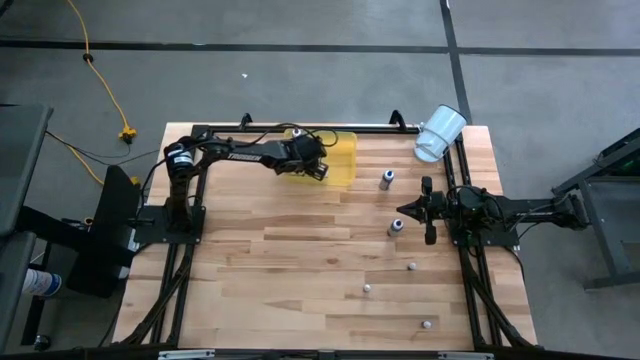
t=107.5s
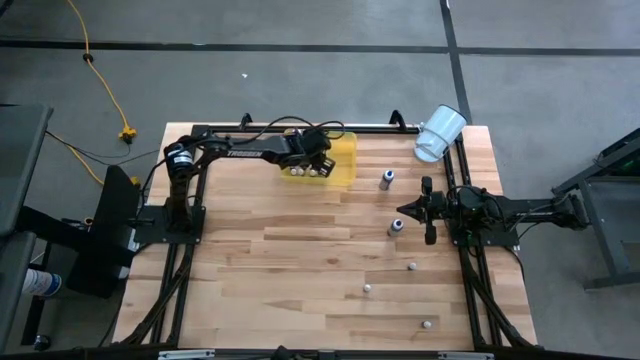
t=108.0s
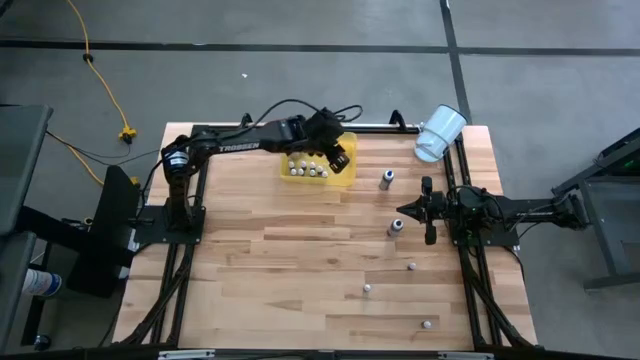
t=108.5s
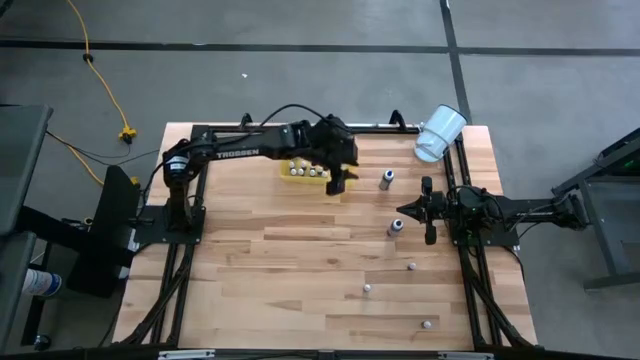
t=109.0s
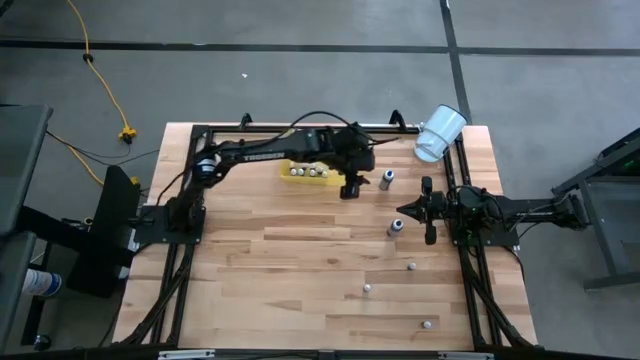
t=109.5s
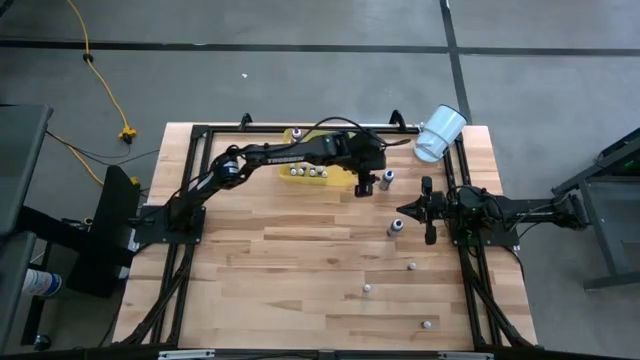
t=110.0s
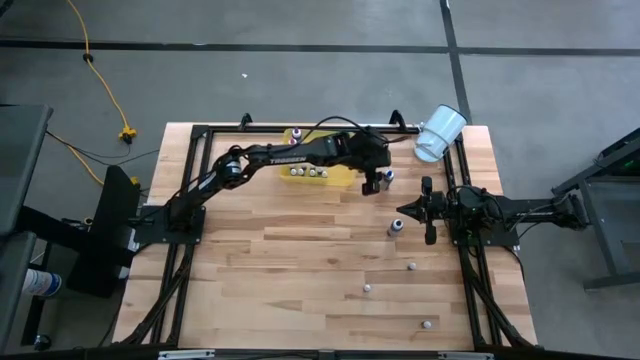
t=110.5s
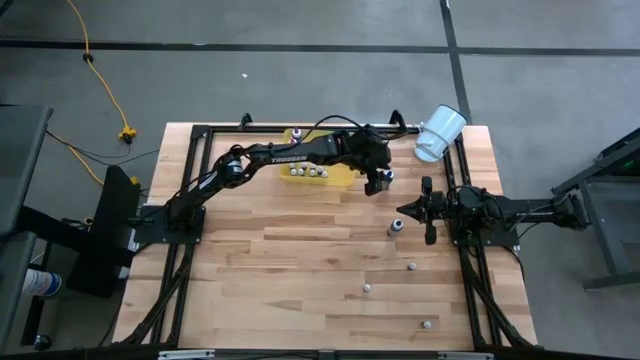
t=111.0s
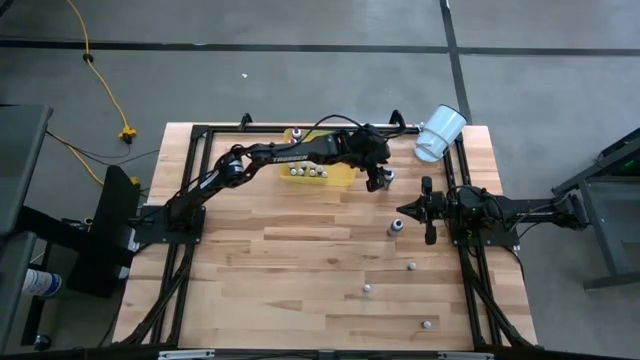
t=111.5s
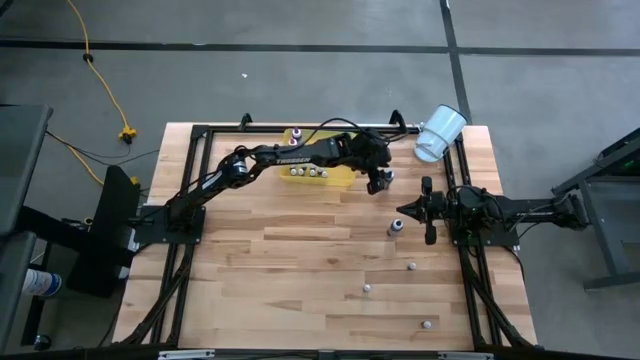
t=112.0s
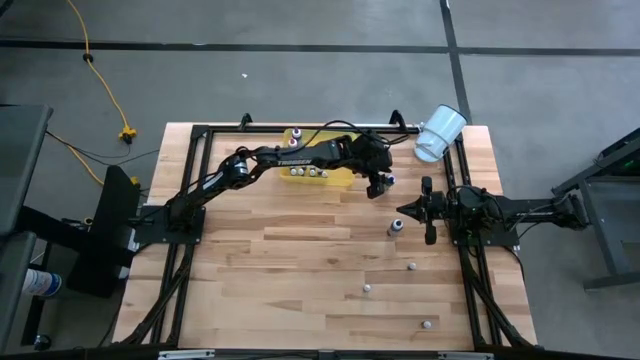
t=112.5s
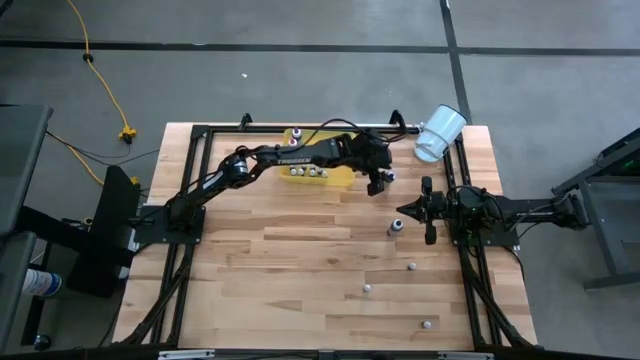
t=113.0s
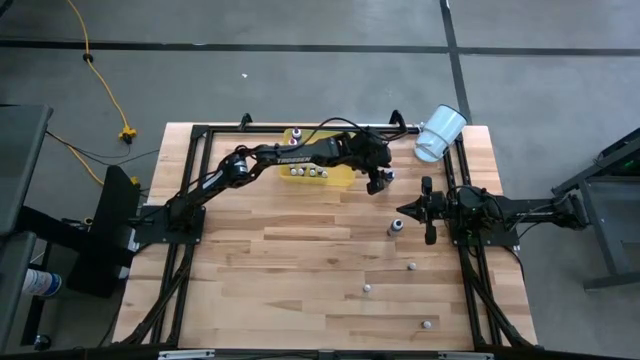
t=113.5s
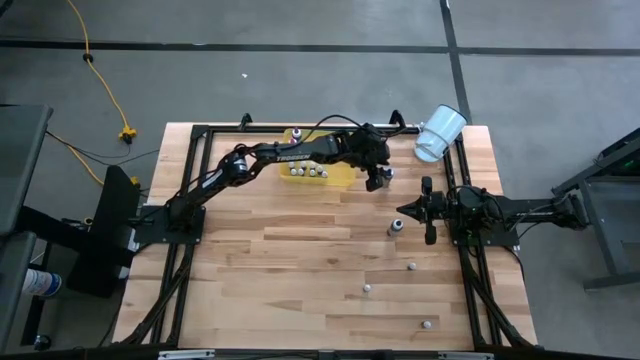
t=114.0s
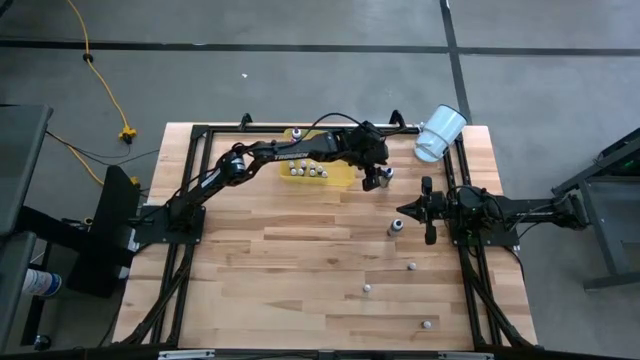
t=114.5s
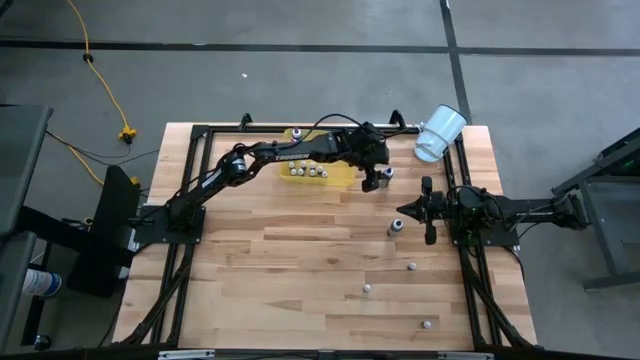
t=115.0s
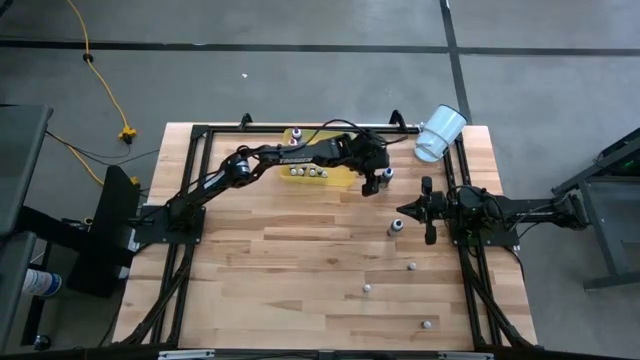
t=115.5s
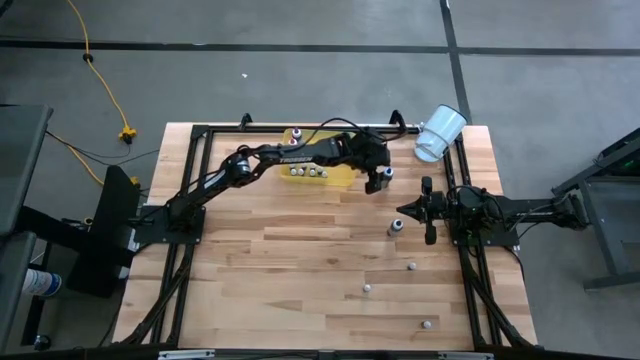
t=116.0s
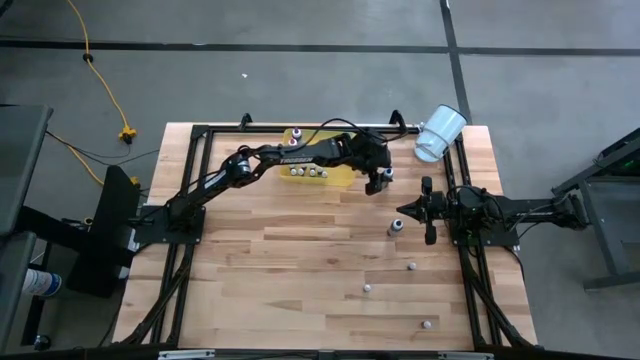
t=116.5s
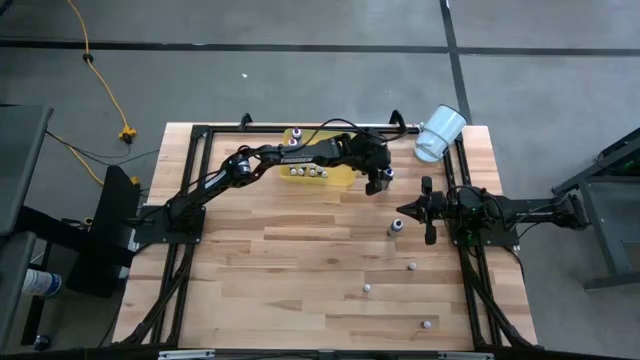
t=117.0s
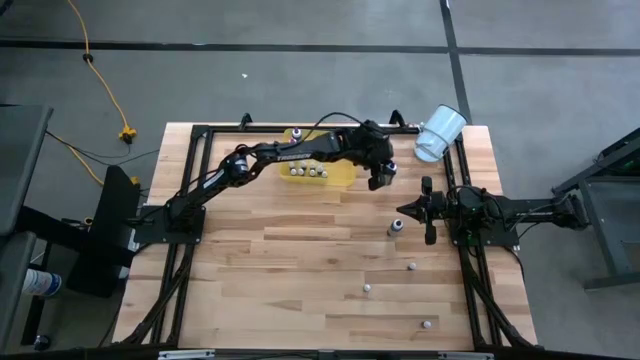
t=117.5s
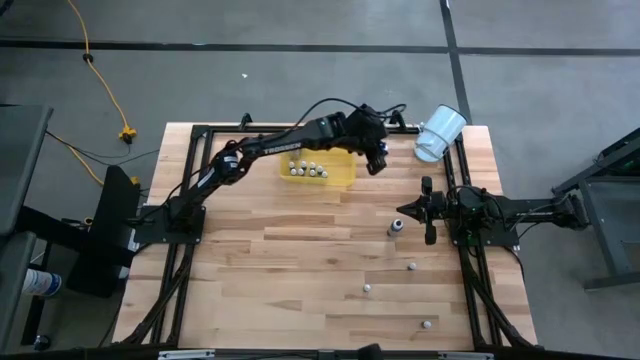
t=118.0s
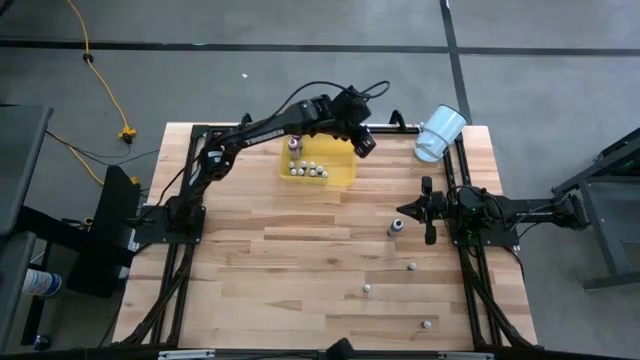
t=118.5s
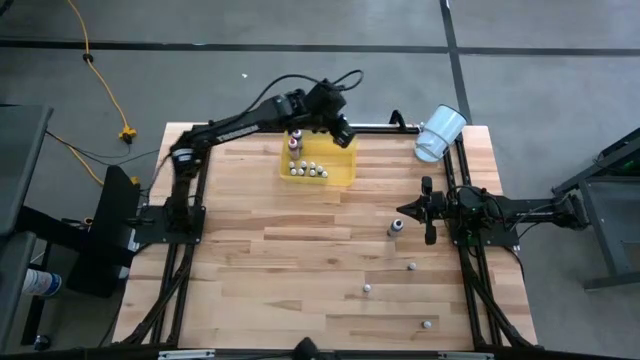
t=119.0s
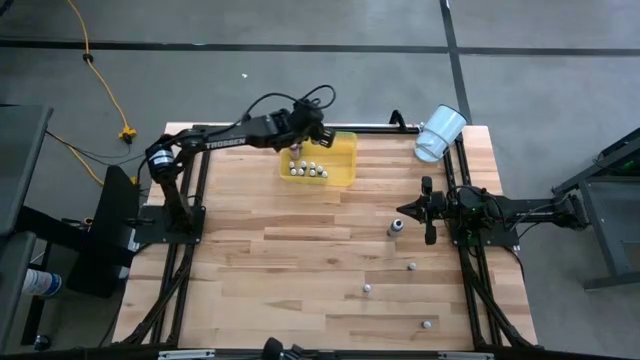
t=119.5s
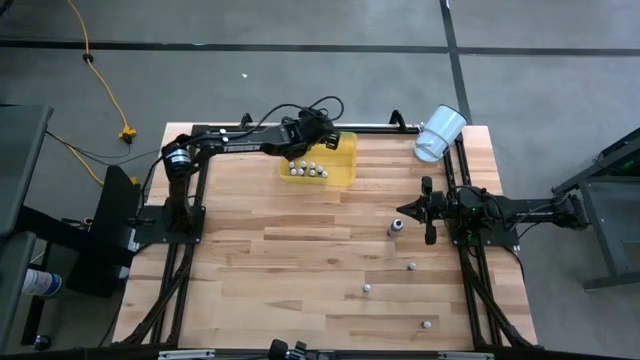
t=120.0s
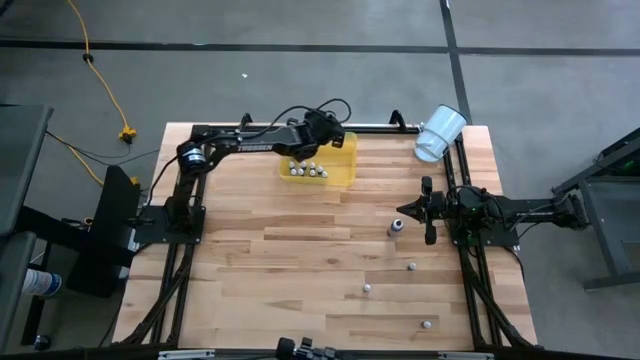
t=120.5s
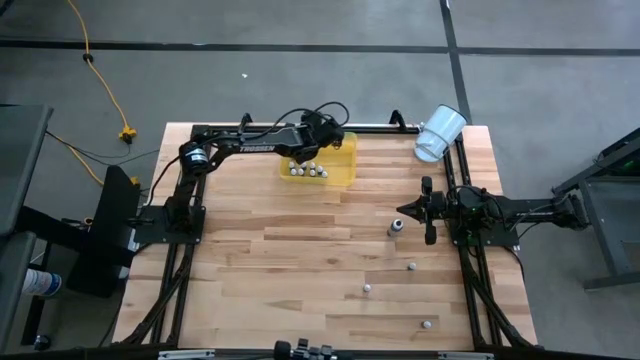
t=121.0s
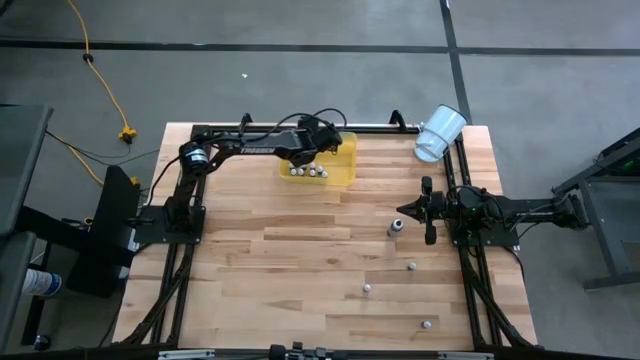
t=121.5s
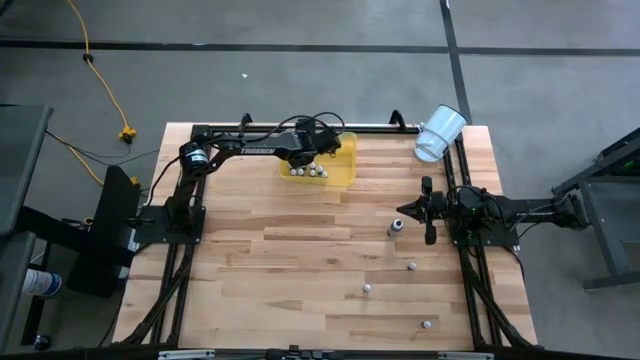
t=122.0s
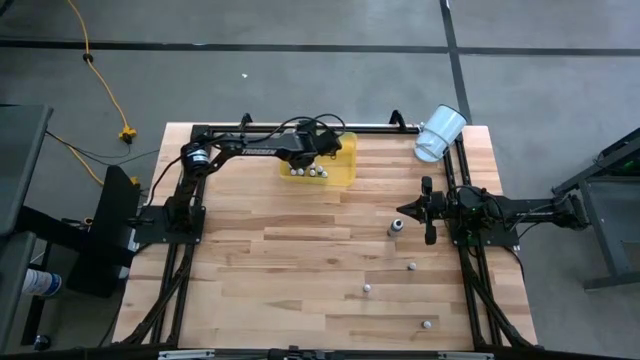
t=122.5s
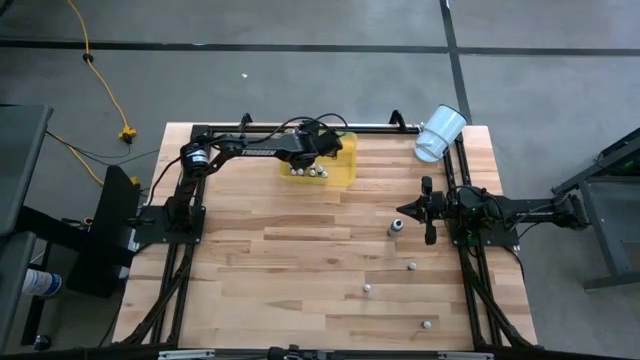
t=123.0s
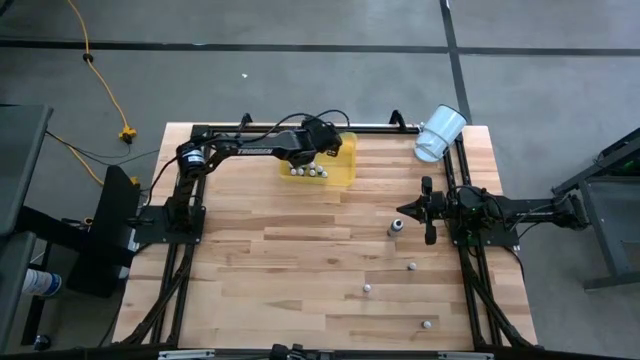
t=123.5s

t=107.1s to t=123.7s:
Task: Pick & Place food coloring
Put the large blue food coloring into the yellow container

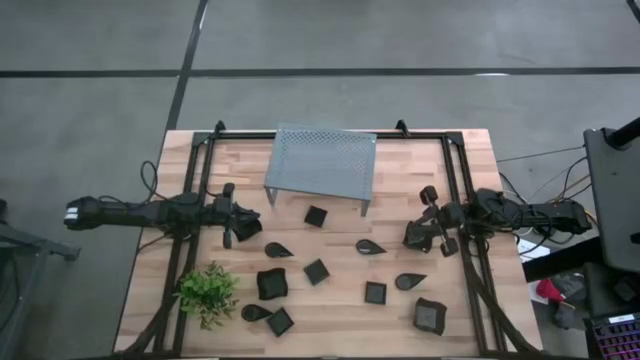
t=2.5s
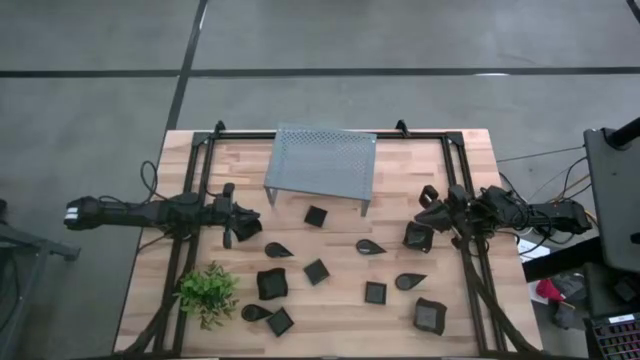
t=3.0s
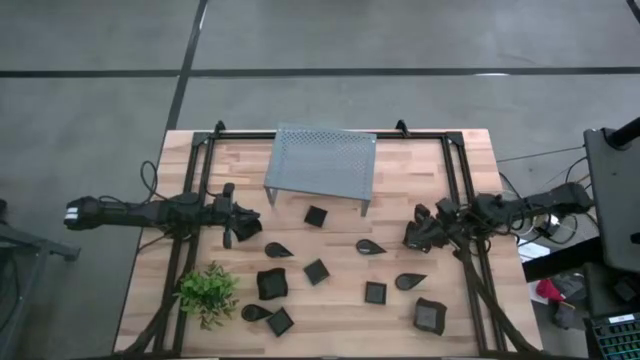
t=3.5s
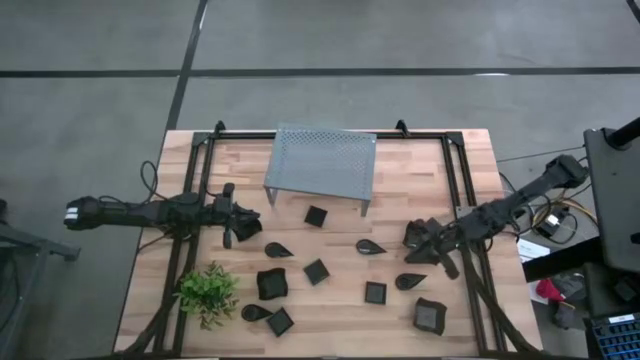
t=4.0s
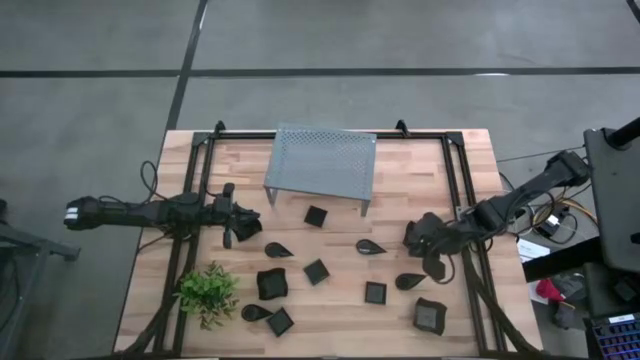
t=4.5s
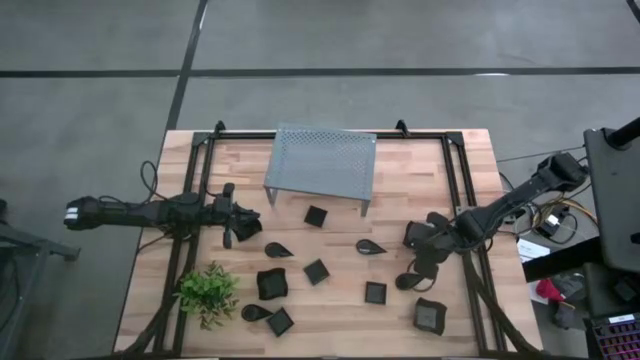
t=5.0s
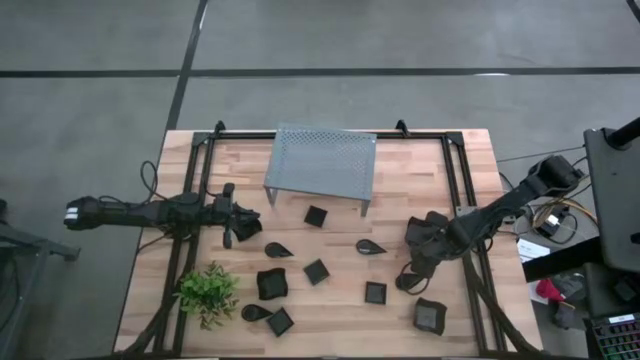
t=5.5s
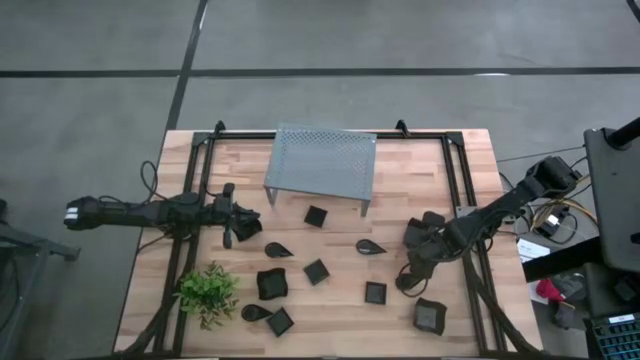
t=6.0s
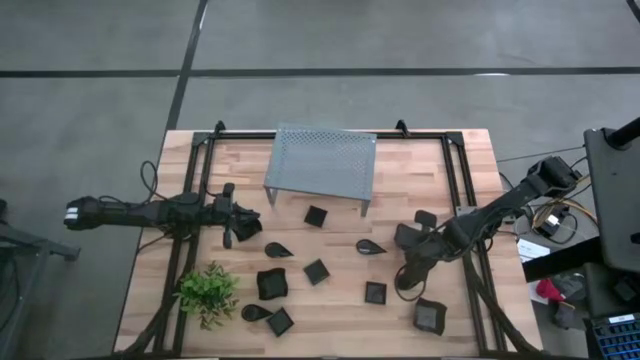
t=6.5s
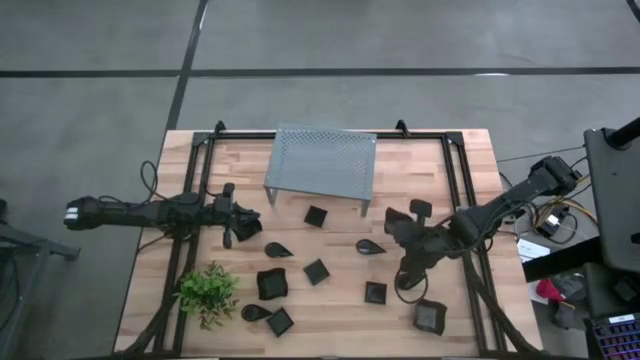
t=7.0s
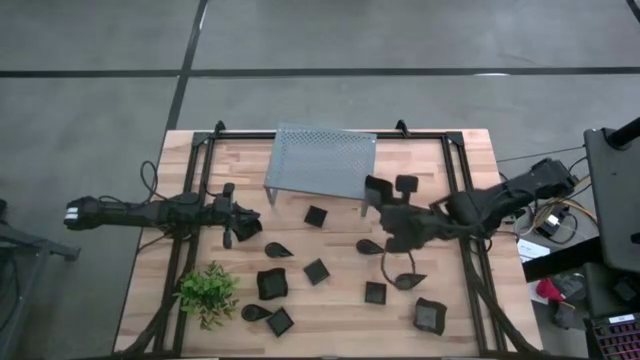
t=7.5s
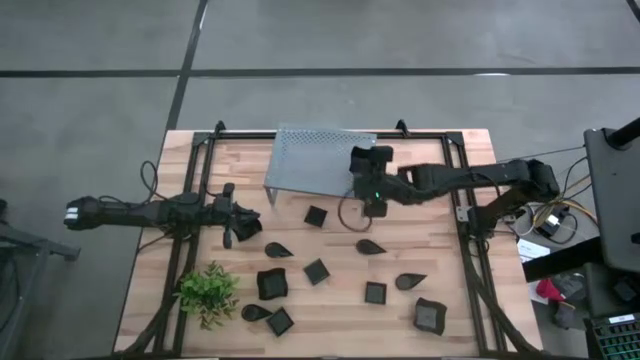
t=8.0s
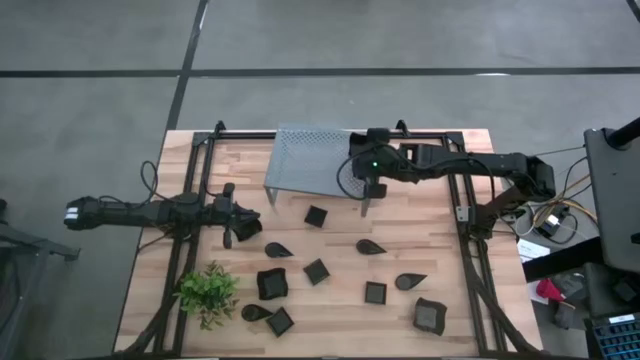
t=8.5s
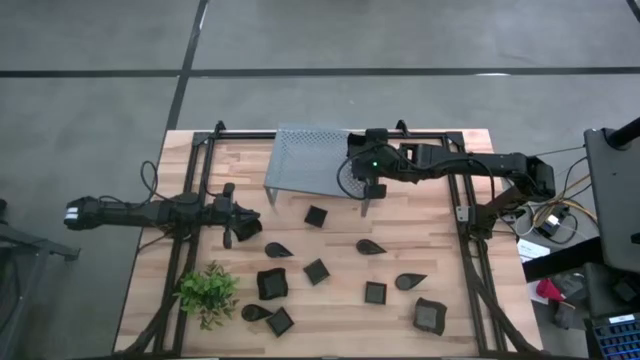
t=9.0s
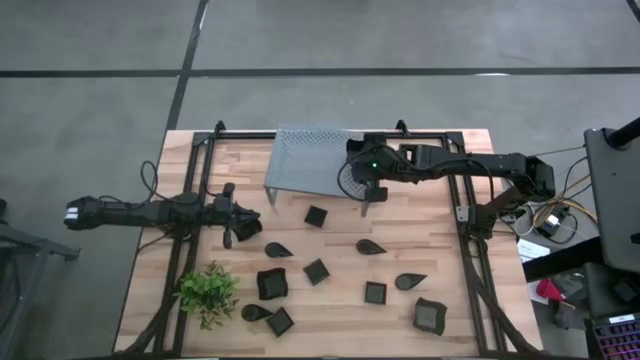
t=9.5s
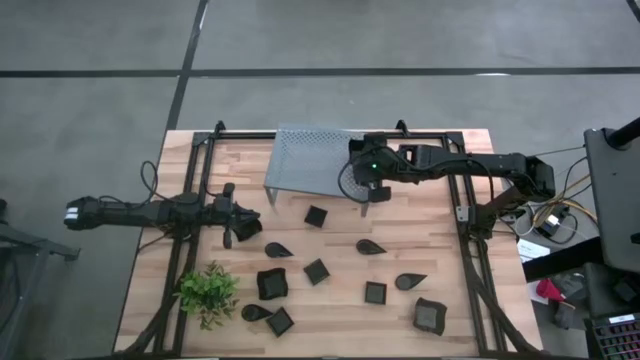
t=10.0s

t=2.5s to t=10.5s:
Task: Pick & Place Mini shaped plates
Put the black distorted square plate on the shelf
